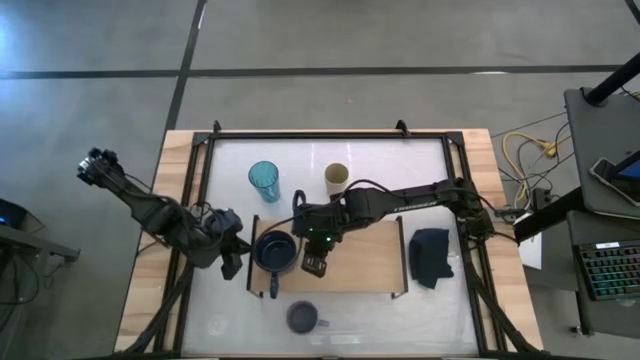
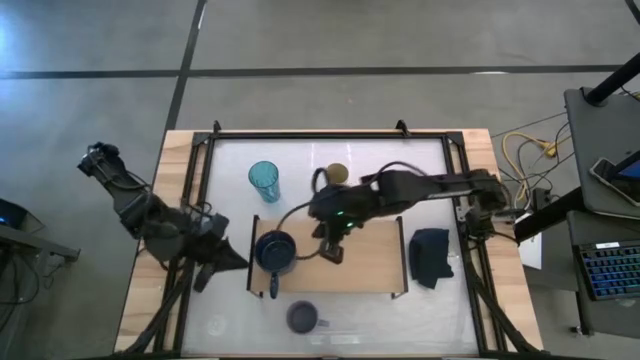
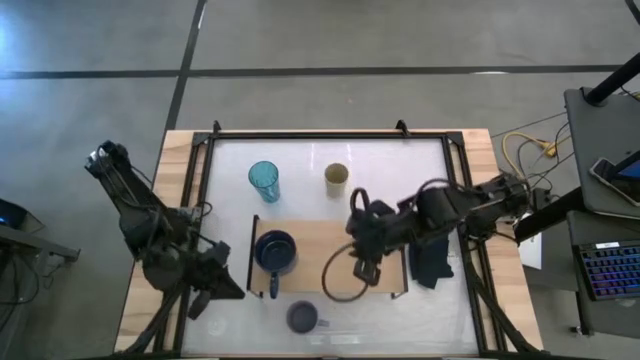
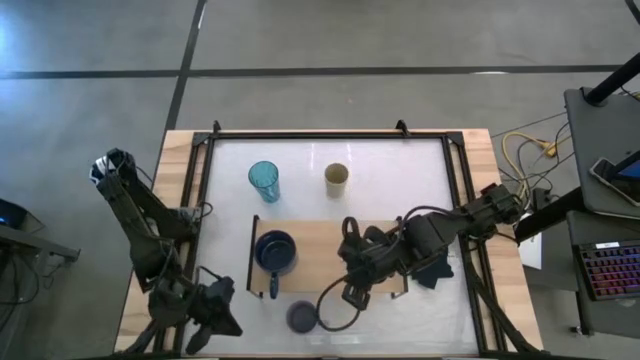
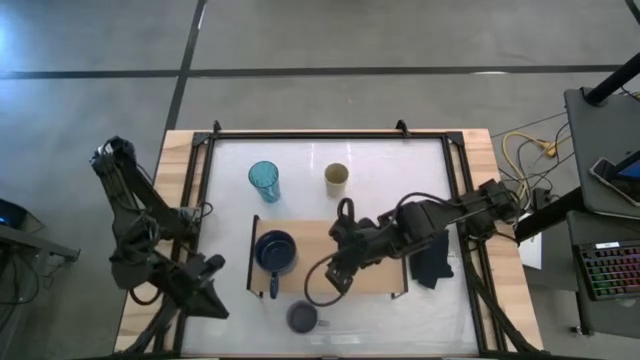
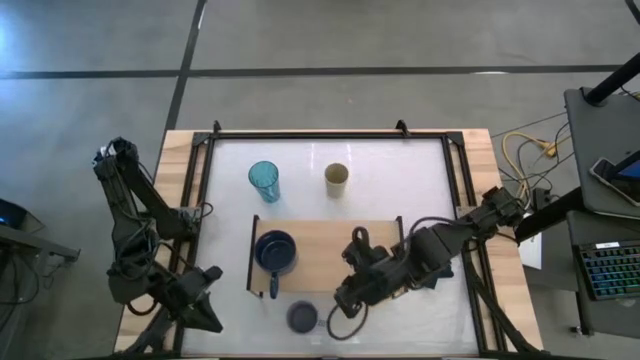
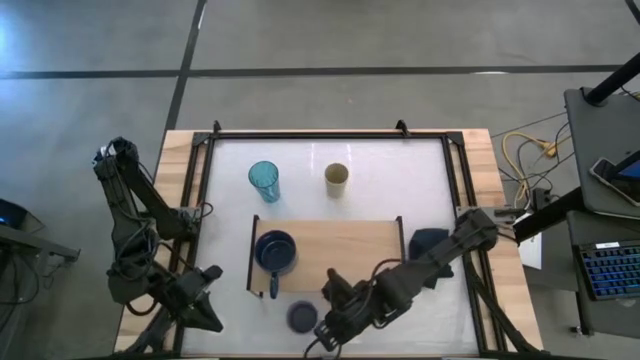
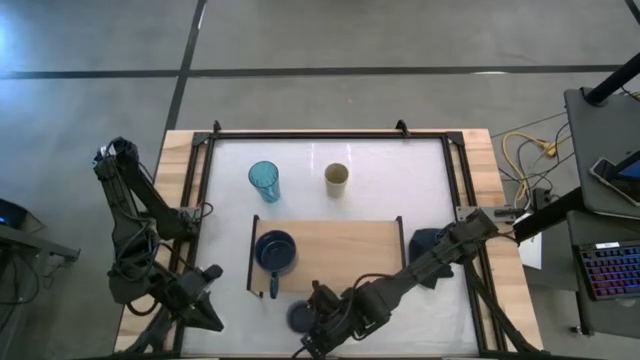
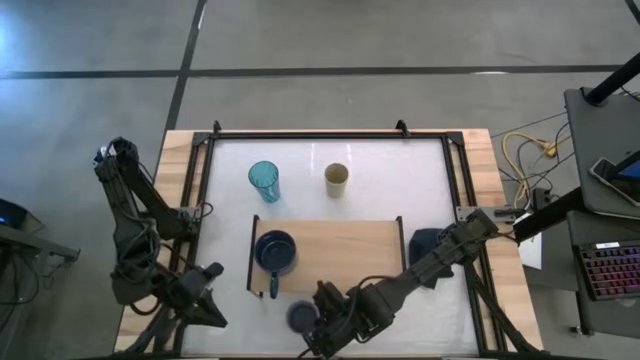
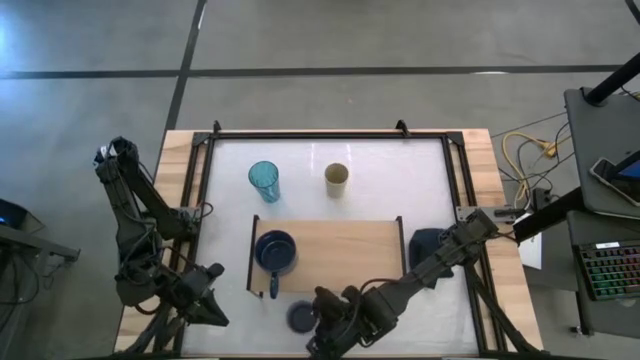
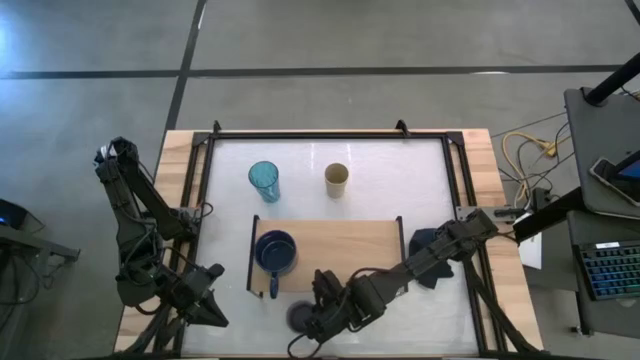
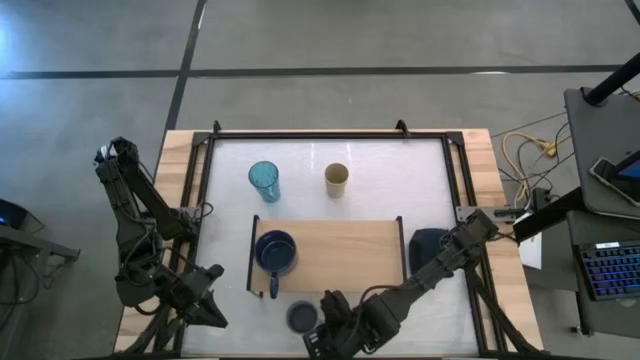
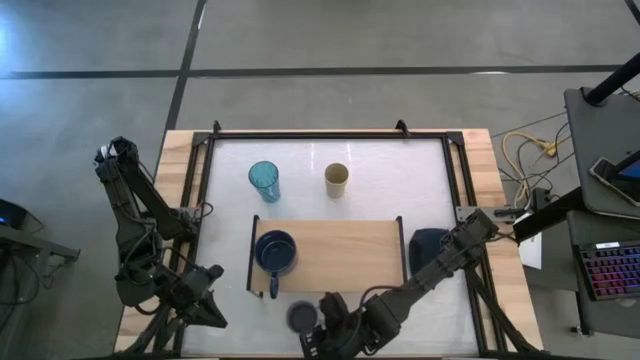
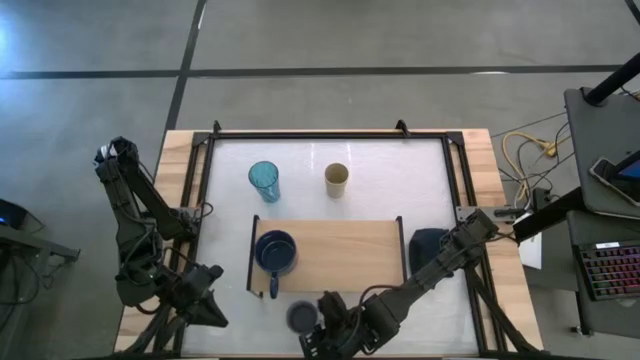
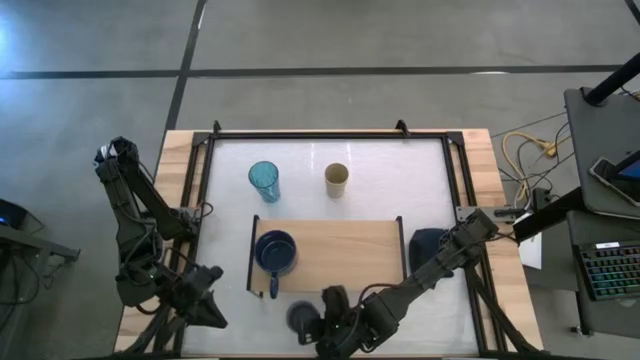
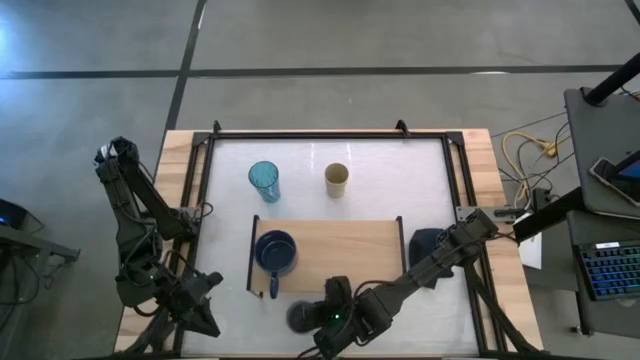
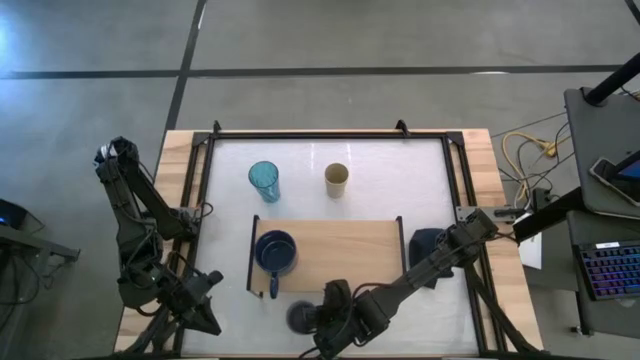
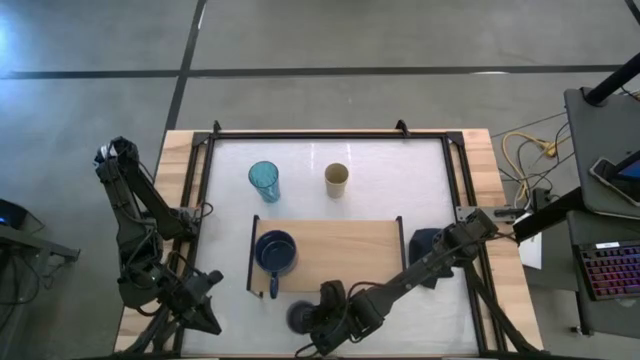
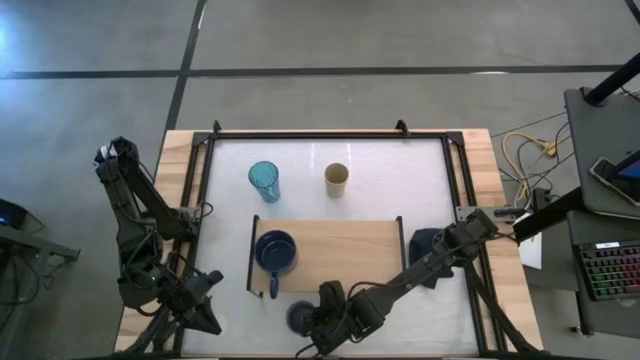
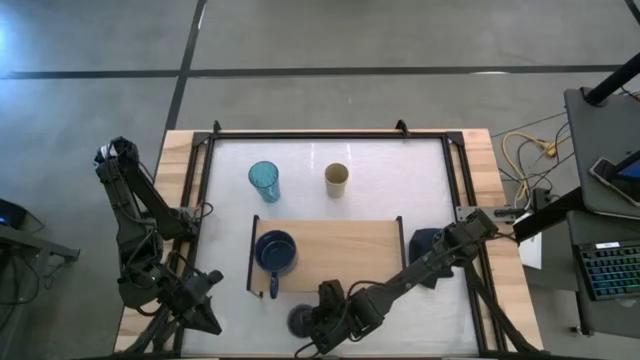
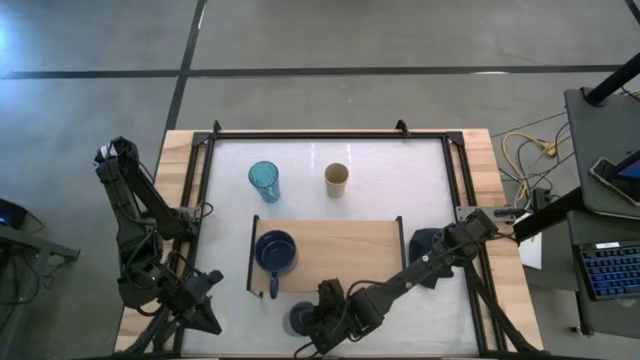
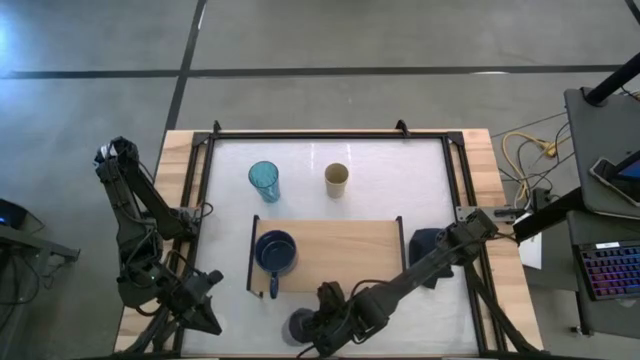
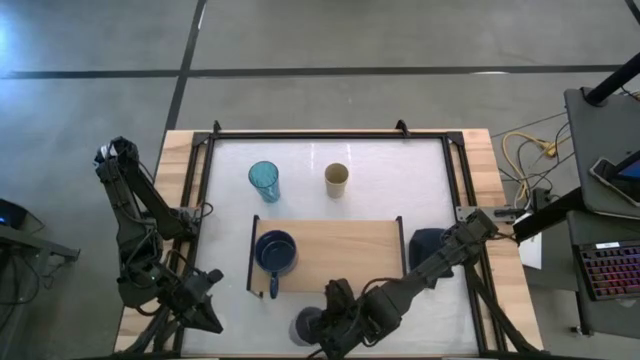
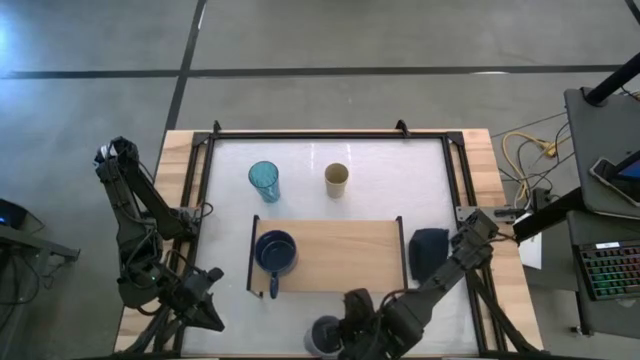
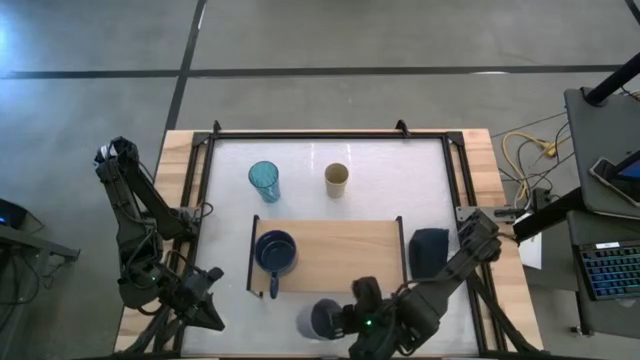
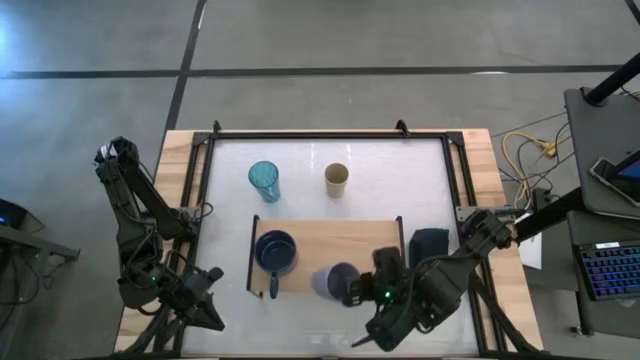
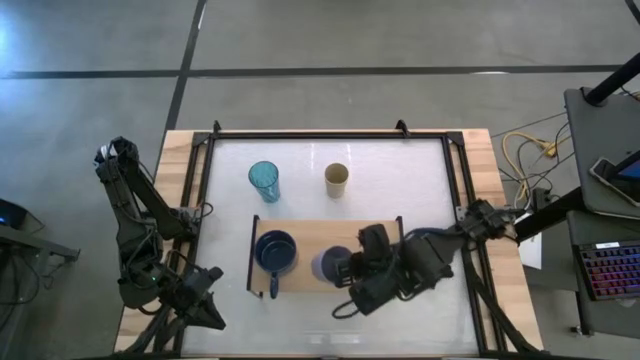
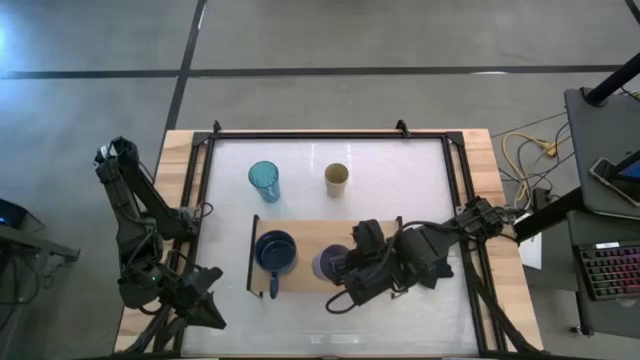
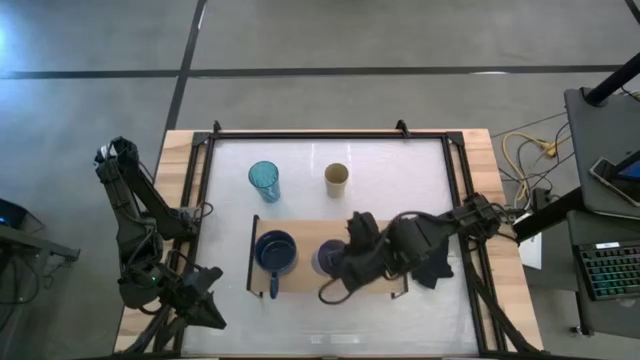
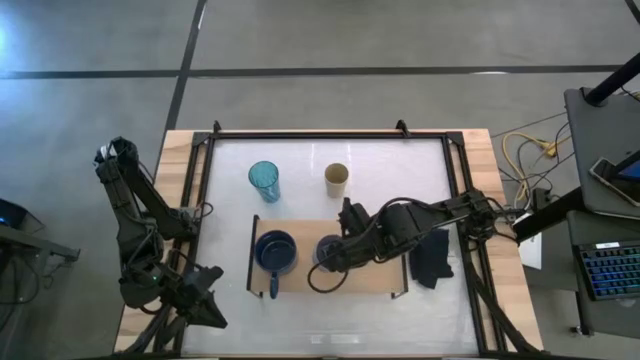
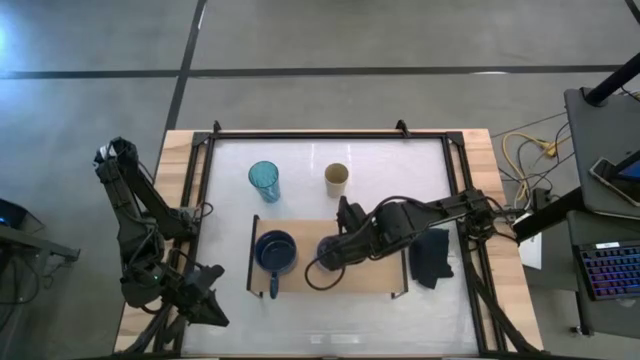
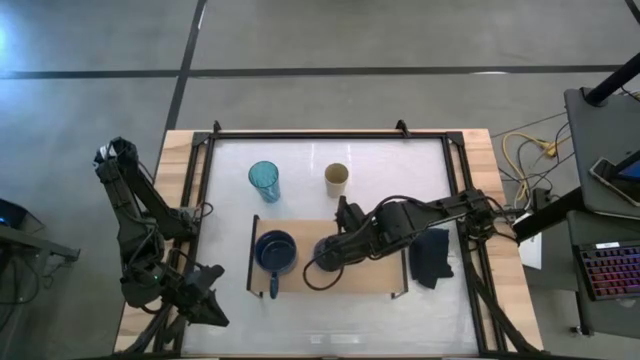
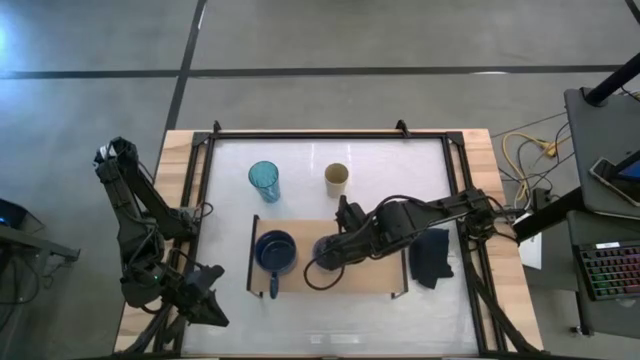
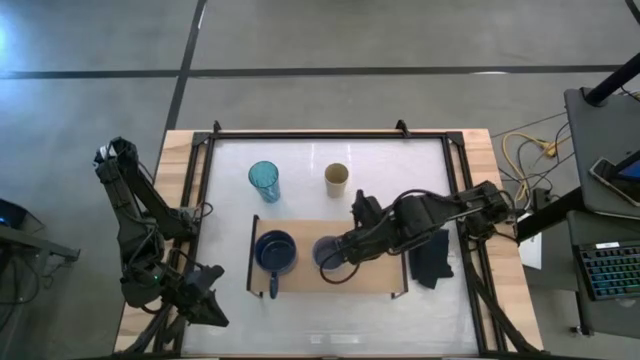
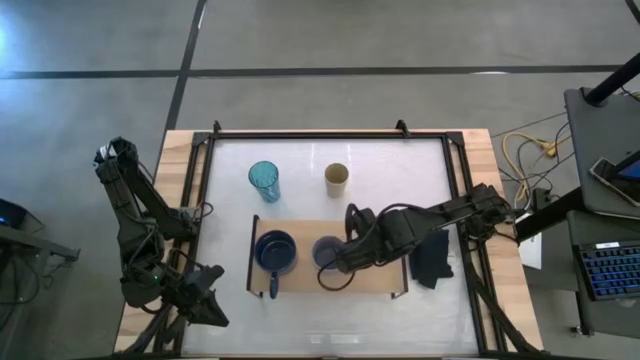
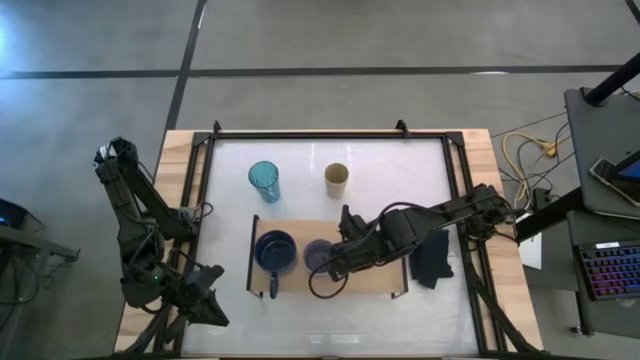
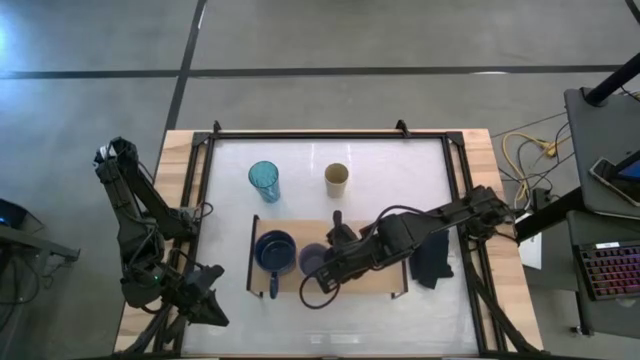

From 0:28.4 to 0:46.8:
Task: Stack small to large cups/mugs on shelf
Put the gray mug on the shelf

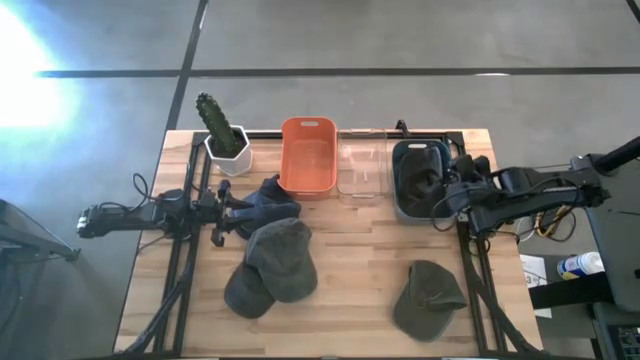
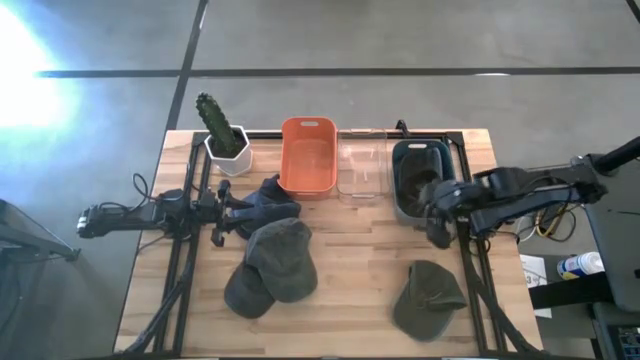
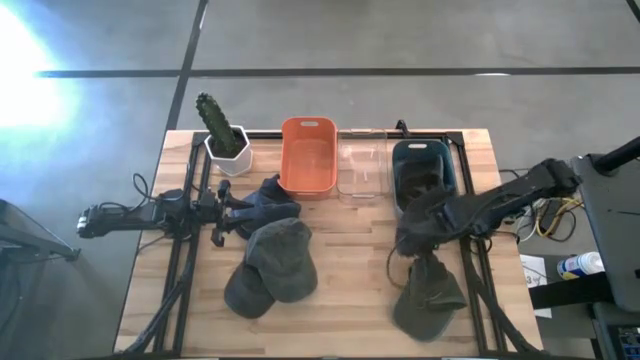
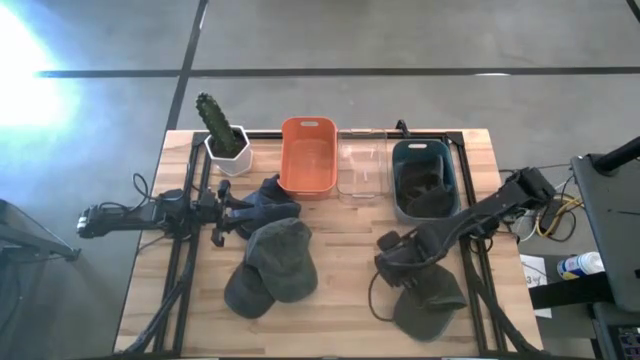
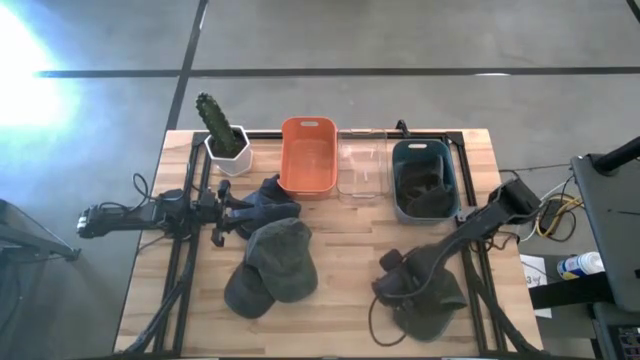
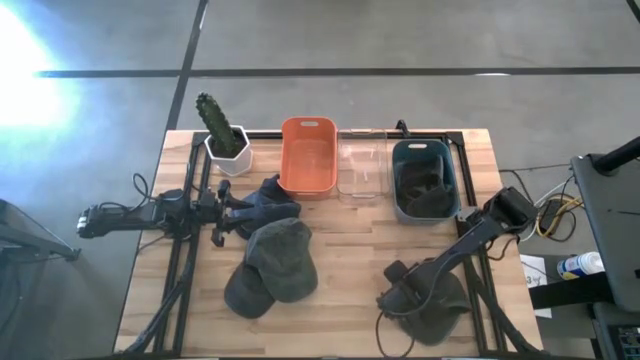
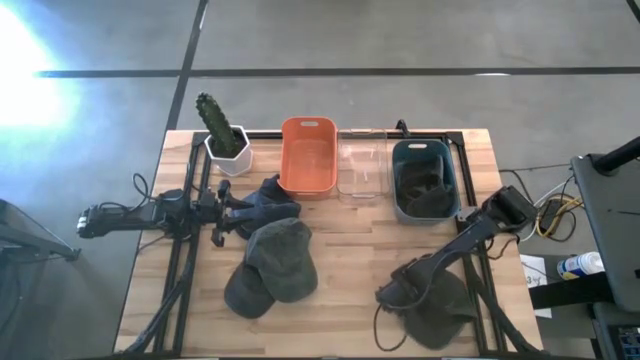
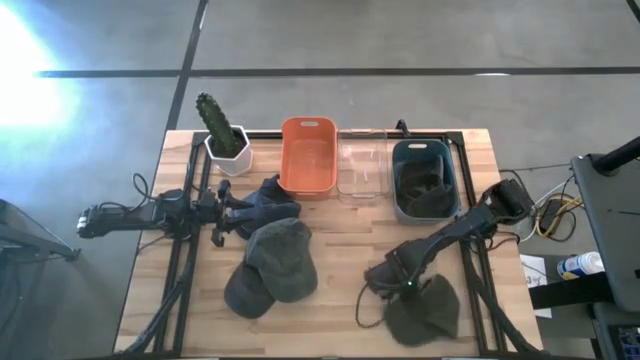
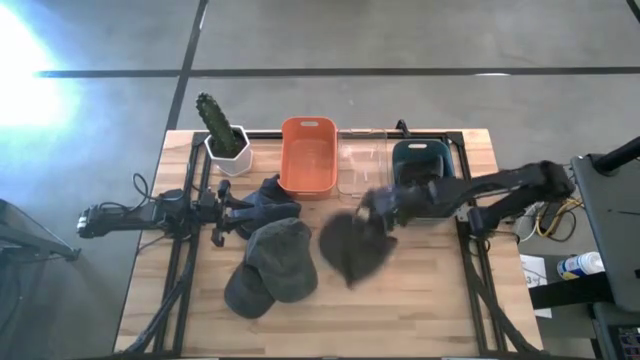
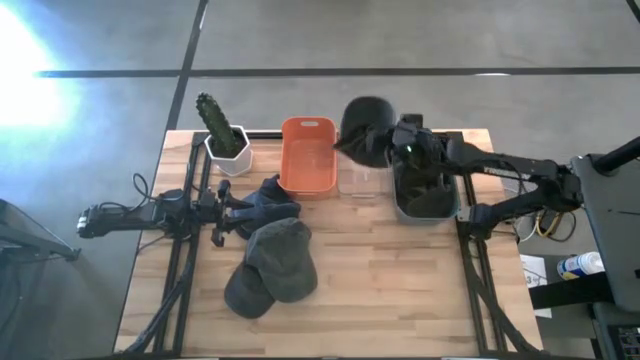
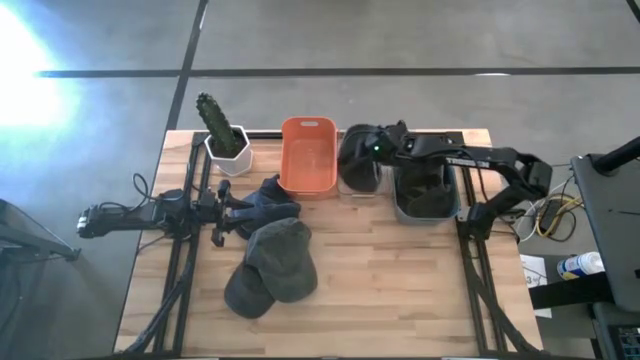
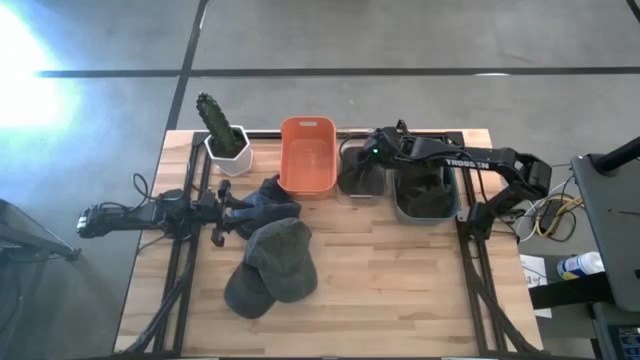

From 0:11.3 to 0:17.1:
Task: Pick & Place hat
Put the gray cap into the transparent bin
